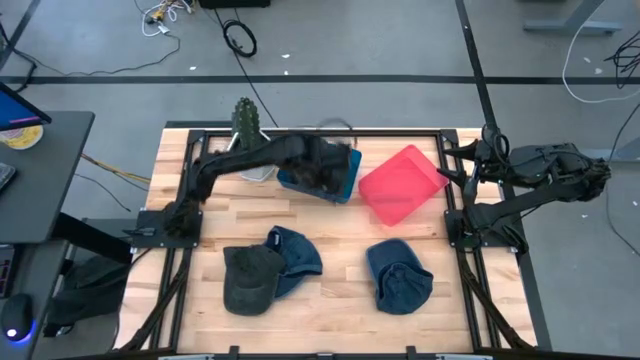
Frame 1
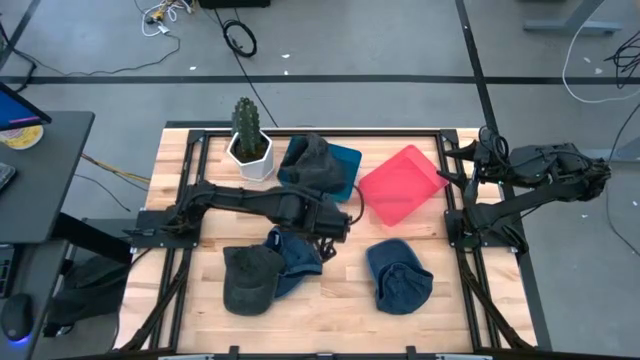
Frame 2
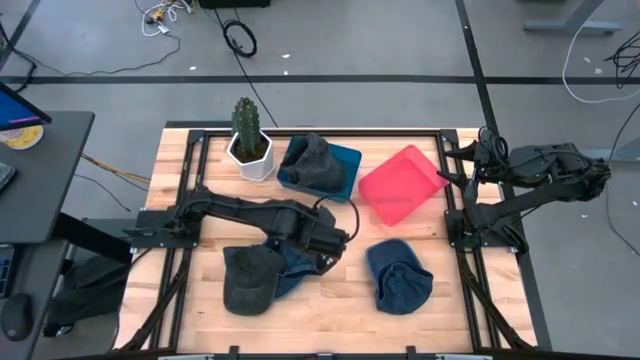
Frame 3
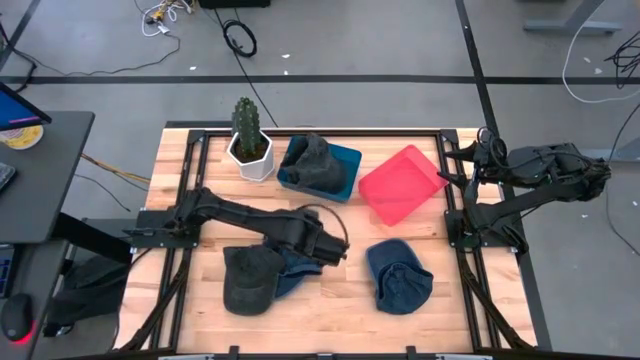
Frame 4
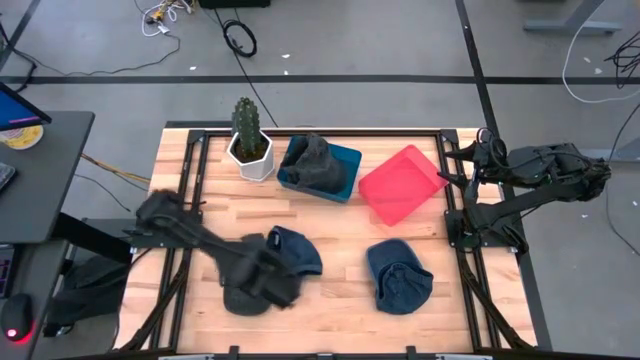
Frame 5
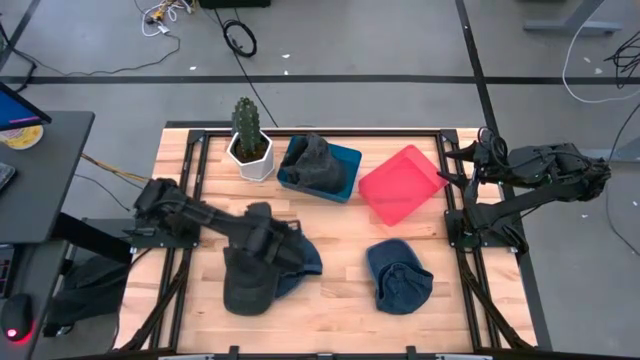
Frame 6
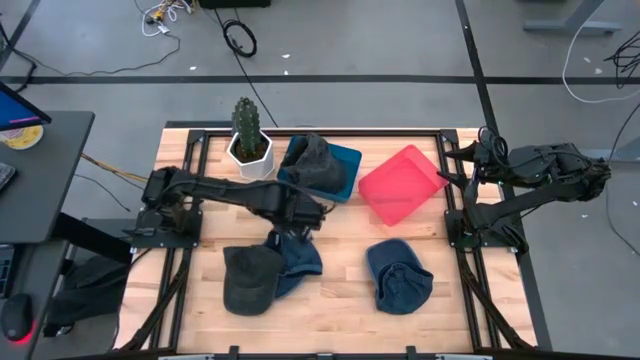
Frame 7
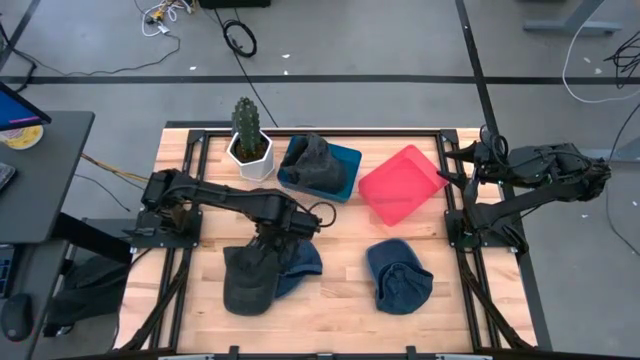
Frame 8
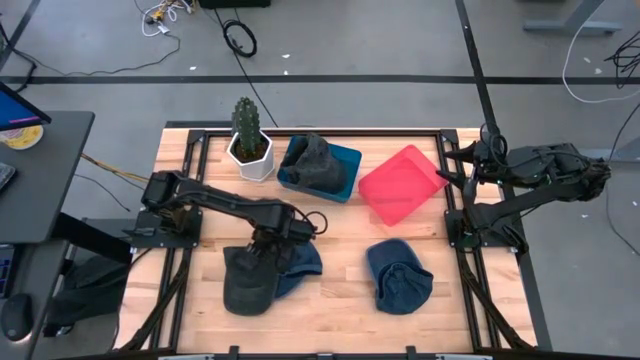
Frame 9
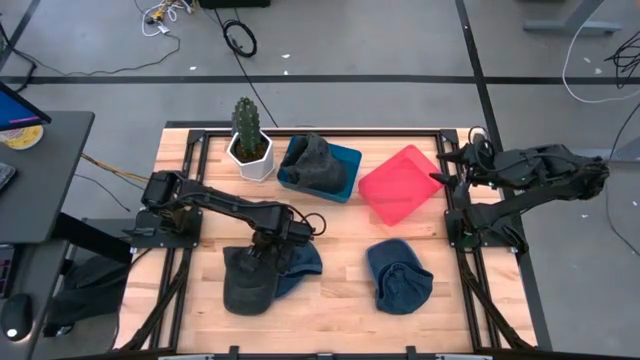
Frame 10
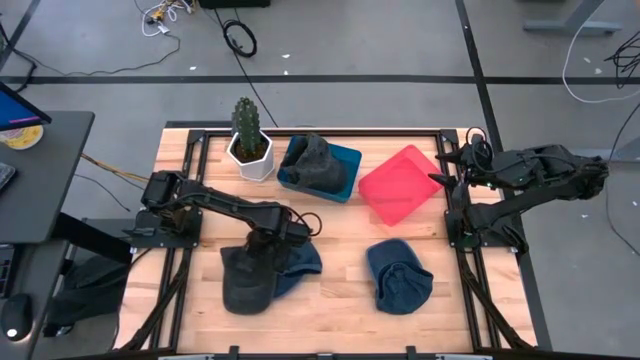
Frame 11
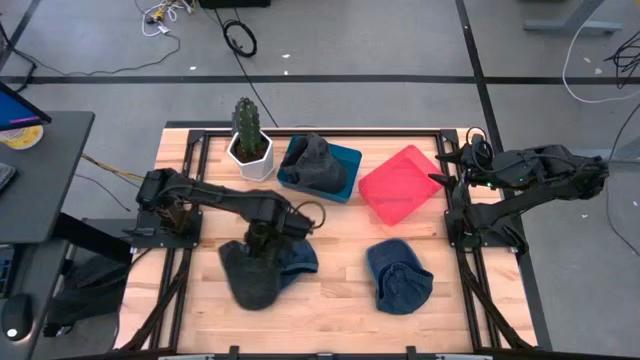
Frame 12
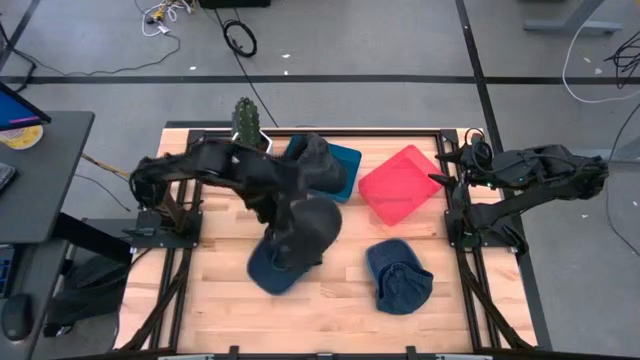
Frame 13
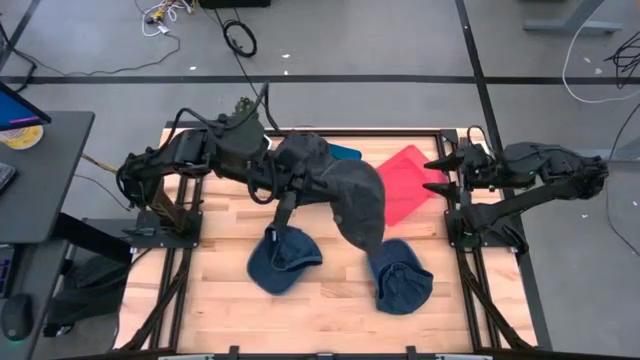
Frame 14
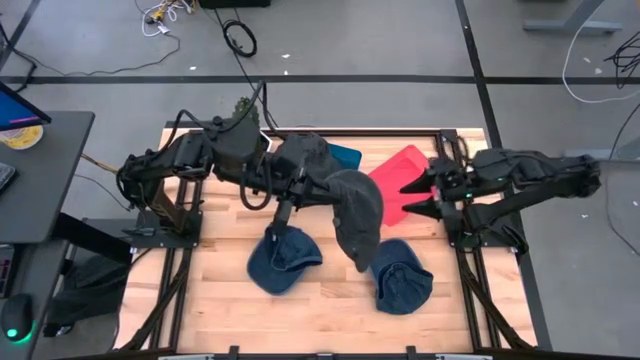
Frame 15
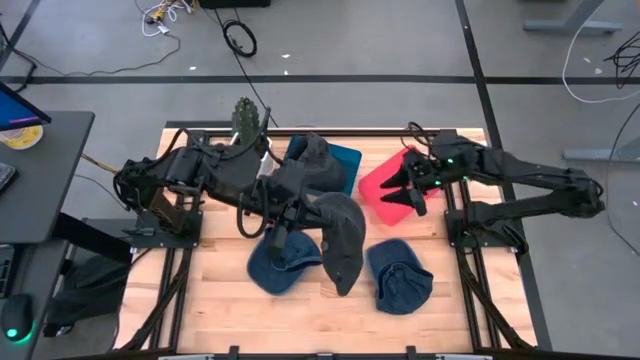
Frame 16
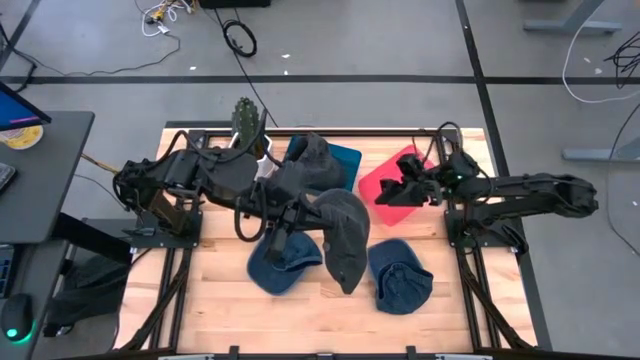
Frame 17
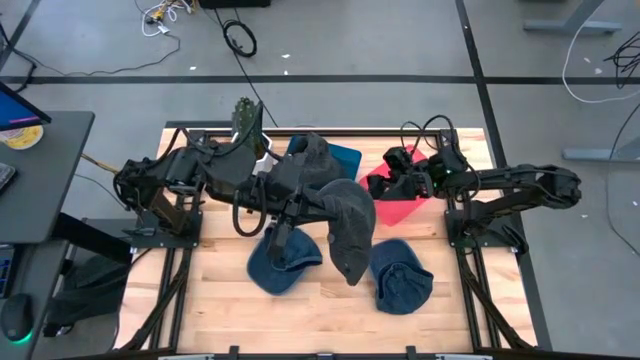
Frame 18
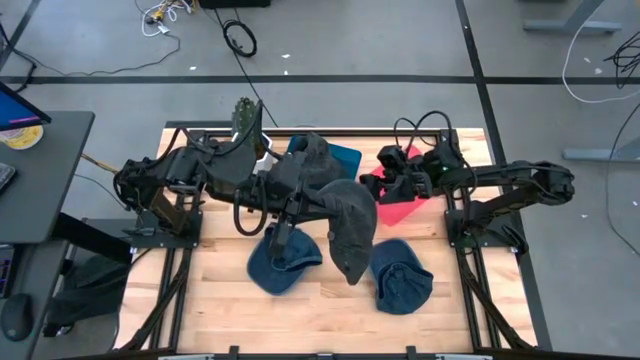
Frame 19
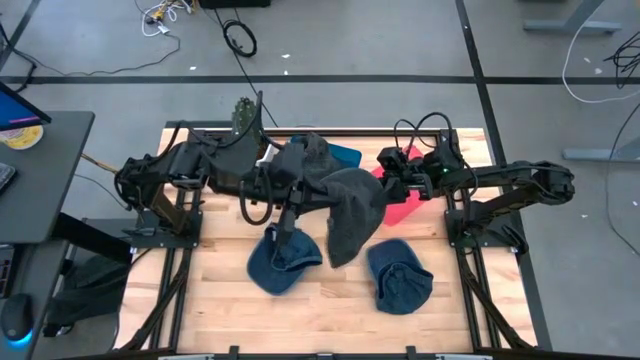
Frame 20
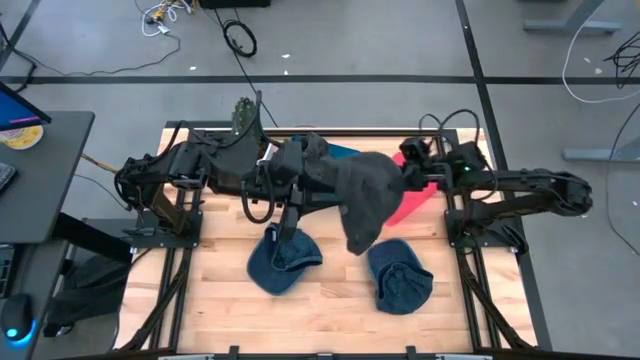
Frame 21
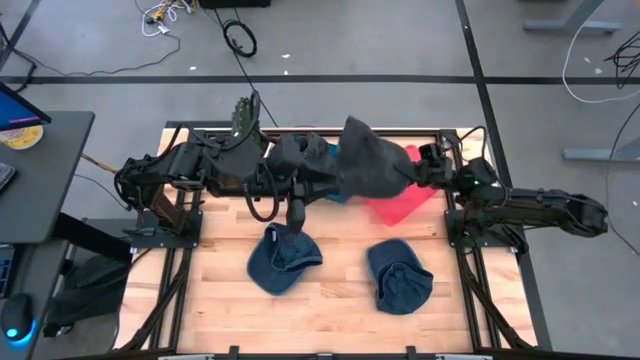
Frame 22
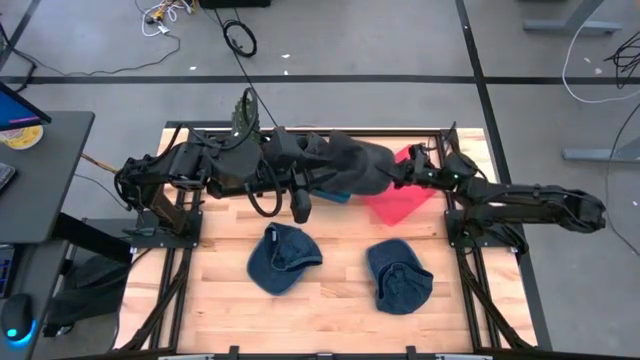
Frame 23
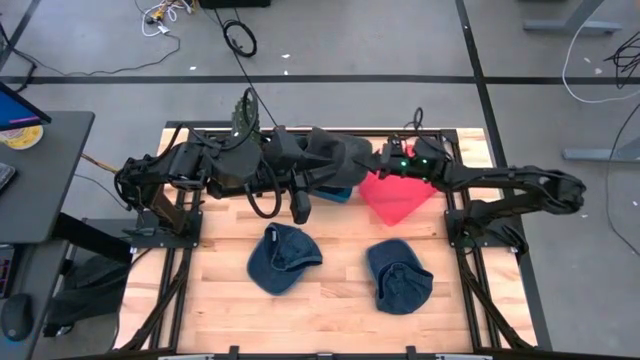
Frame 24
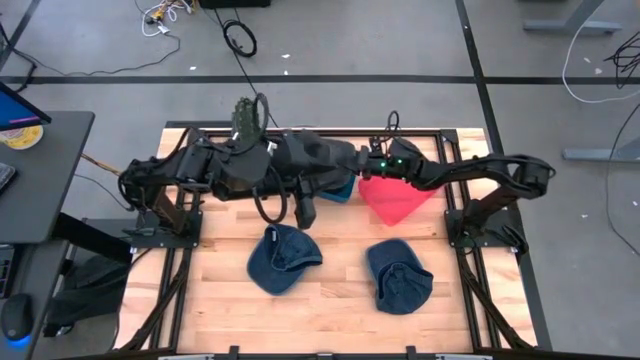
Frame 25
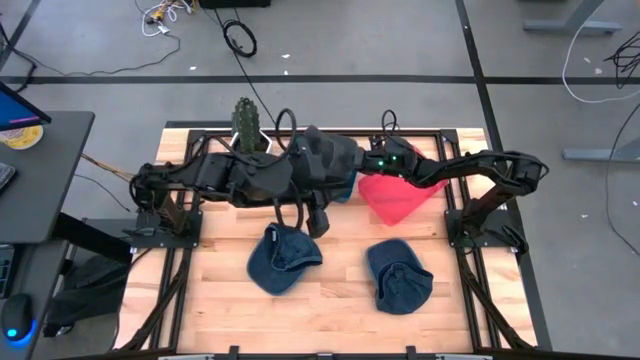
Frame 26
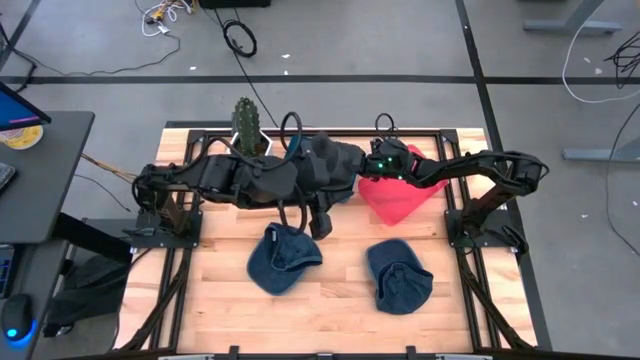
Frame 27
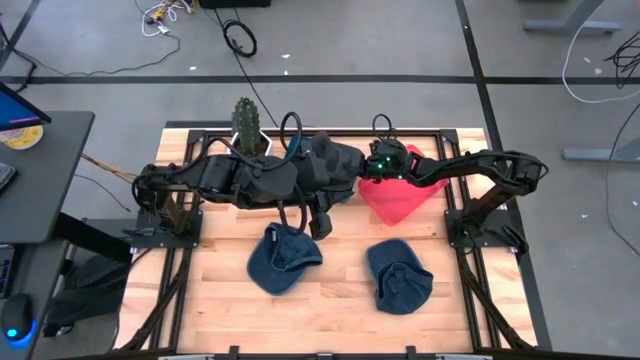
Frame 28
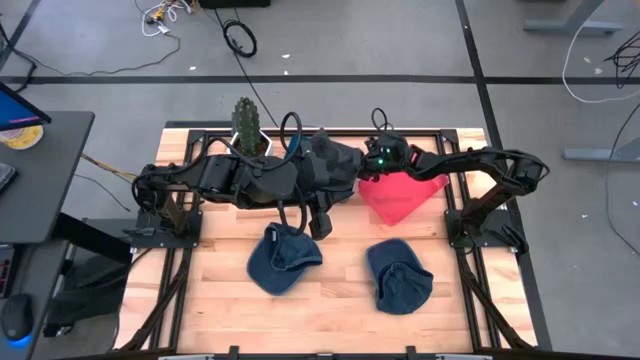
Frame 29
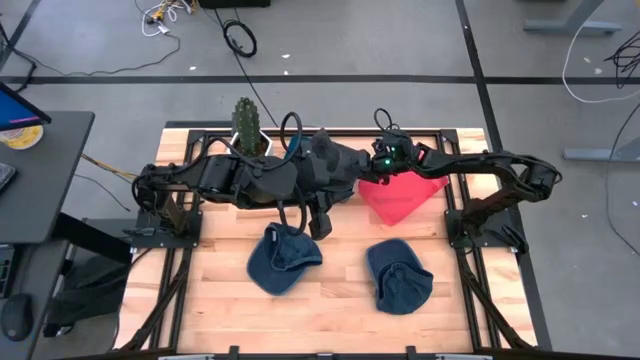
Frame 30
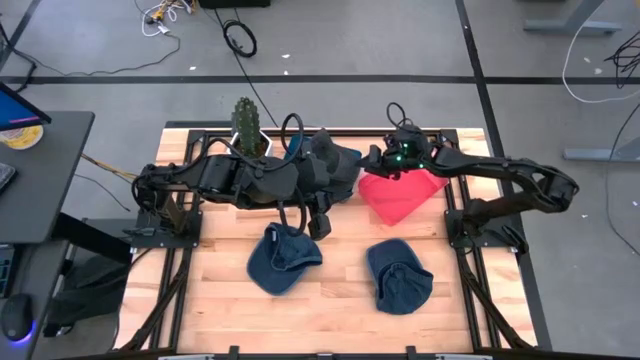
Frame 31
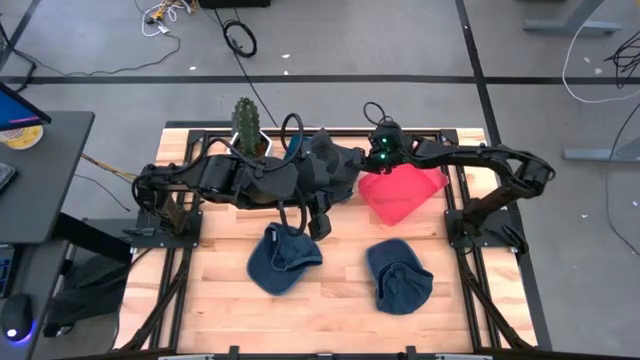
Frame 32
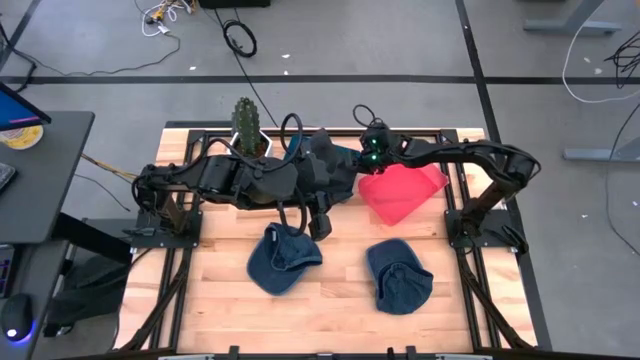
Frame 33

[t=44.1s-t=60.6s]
Task: Pick & Place hat
Put the black cap into the blue bin

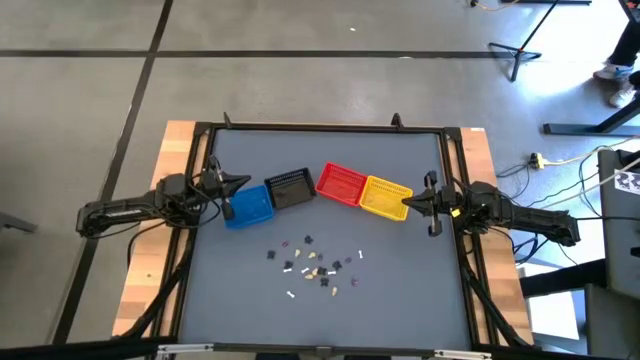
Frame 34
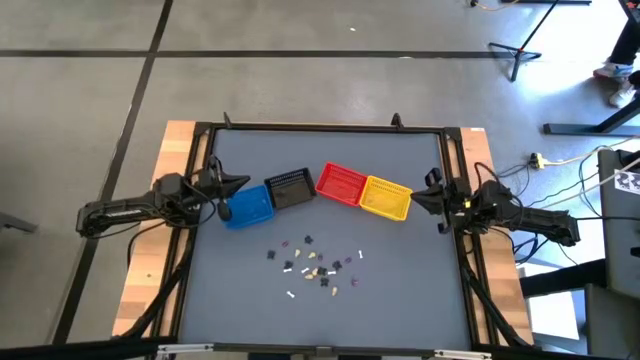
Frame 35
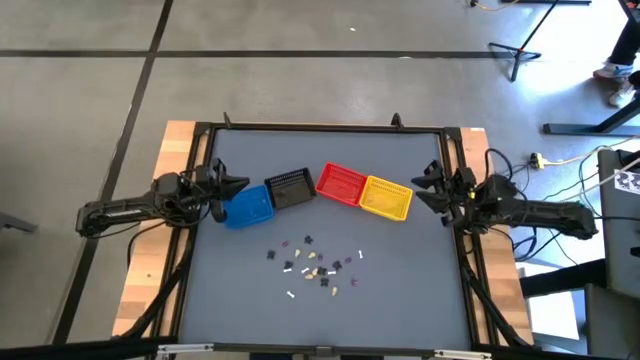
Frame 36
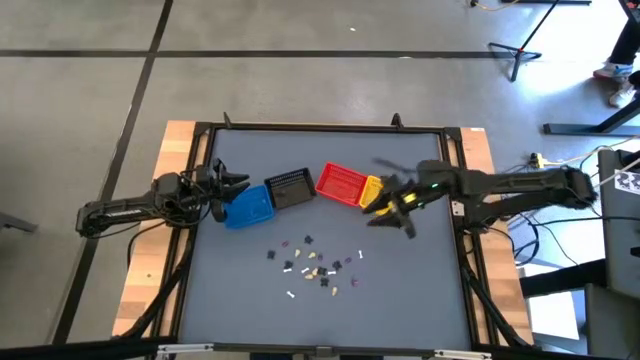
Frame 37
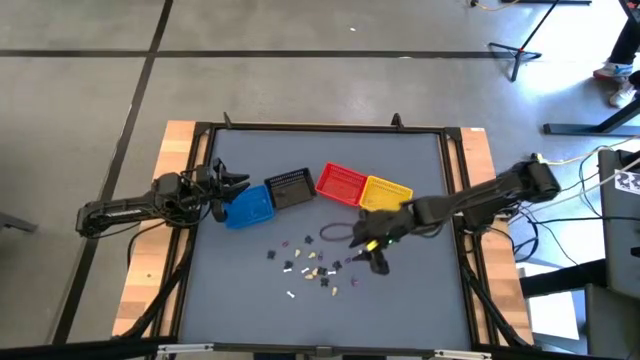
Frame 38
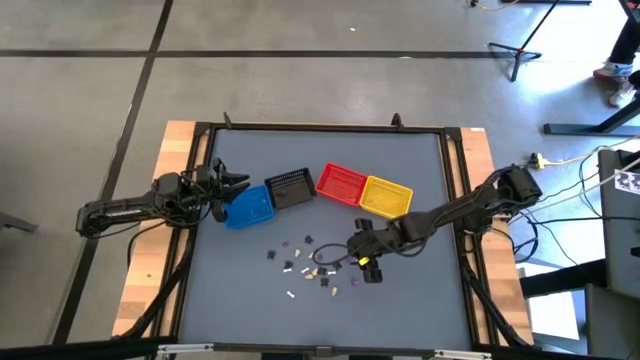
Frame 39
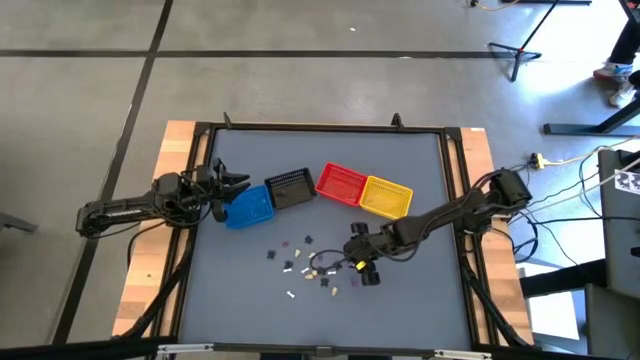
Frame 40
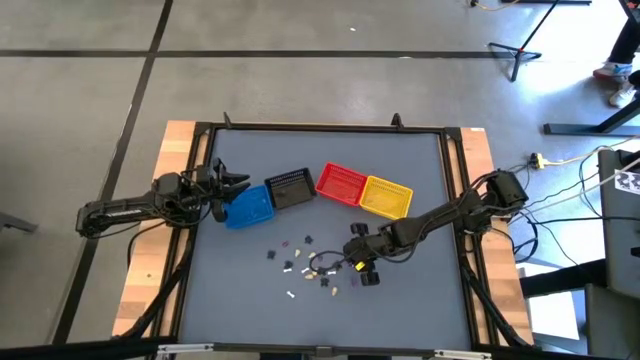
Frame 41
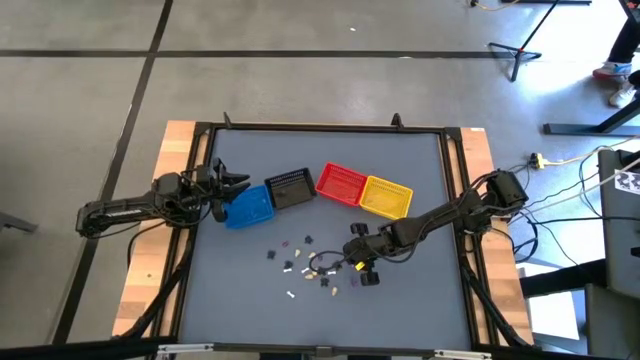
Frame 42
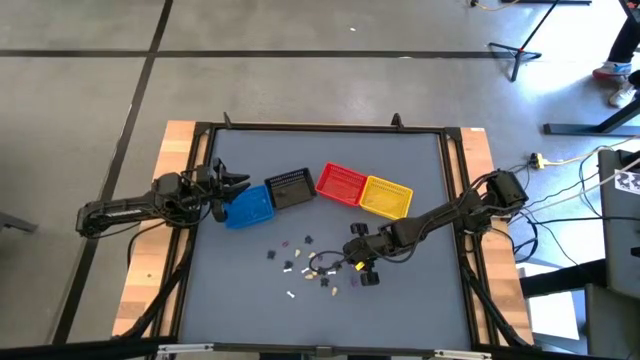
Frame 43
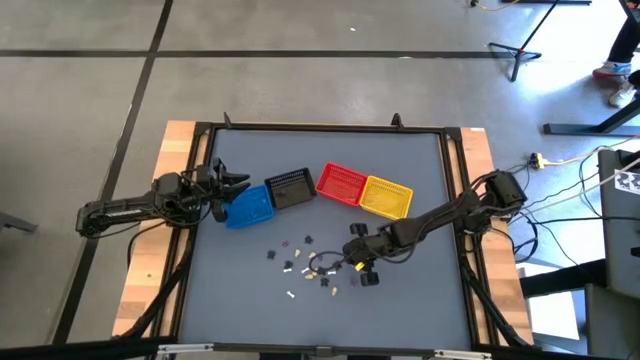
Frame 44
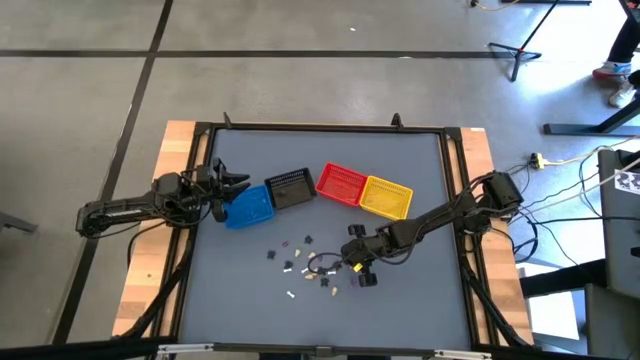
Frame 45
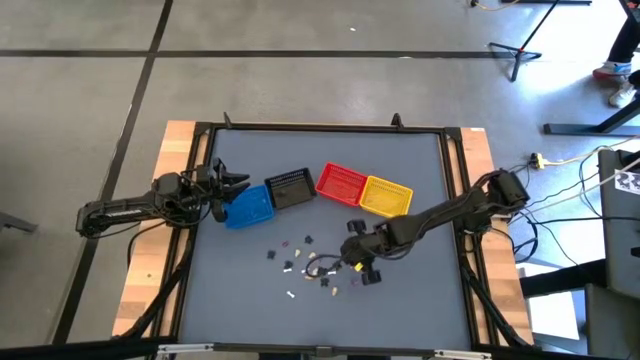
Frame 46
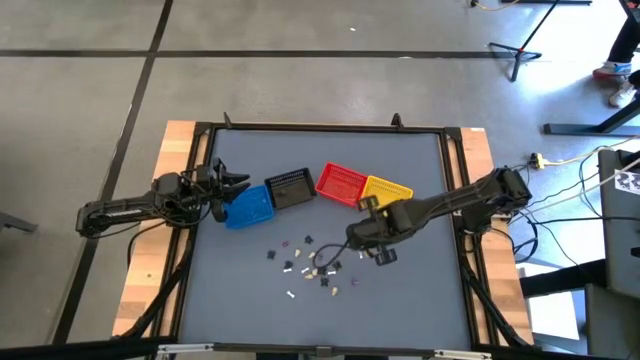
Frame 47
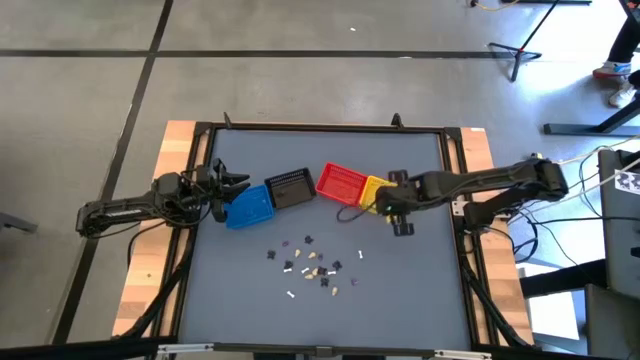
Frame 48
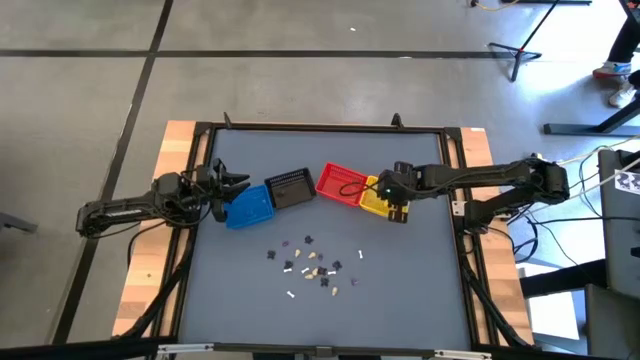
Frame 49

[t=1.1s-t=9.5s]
Task: Sort Halloween decoration
Put the purple witch hat toy into the yellow bin
